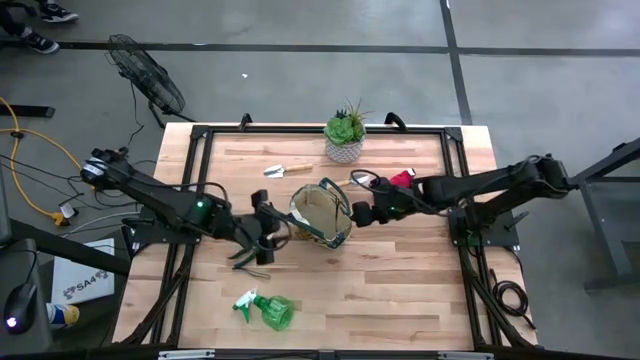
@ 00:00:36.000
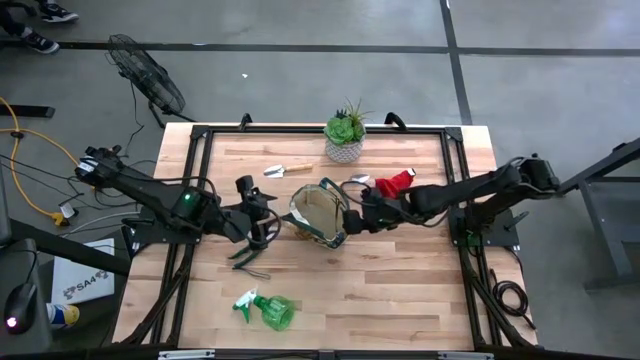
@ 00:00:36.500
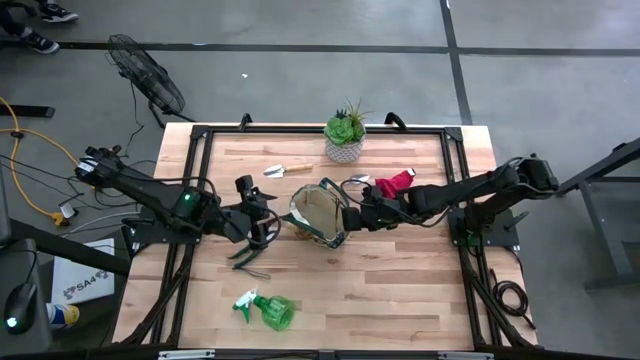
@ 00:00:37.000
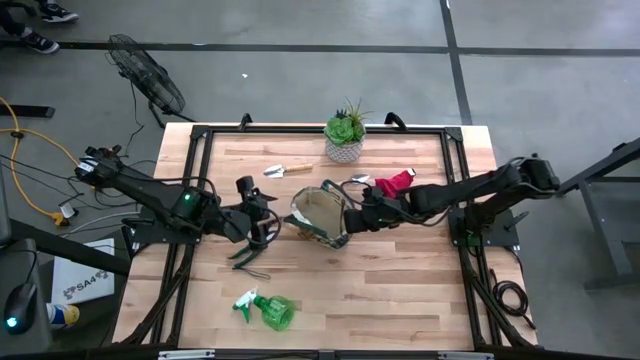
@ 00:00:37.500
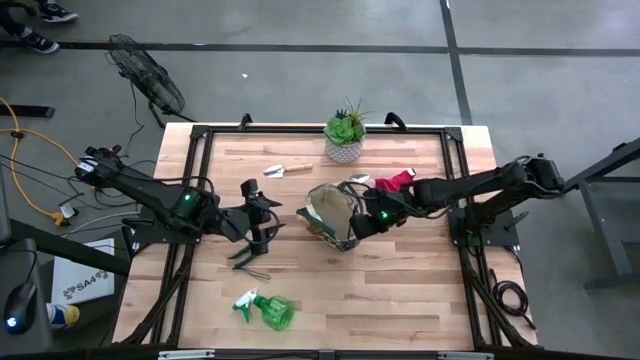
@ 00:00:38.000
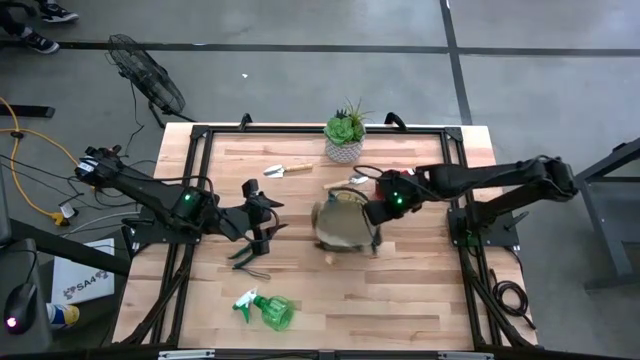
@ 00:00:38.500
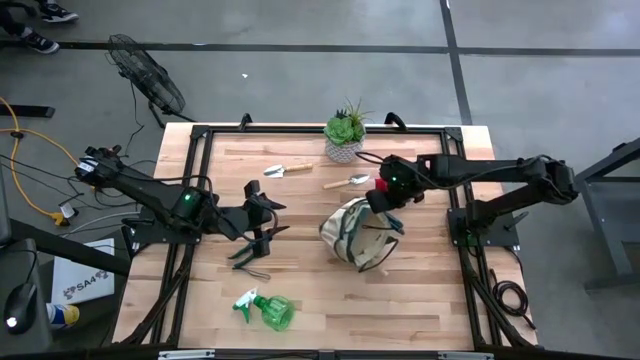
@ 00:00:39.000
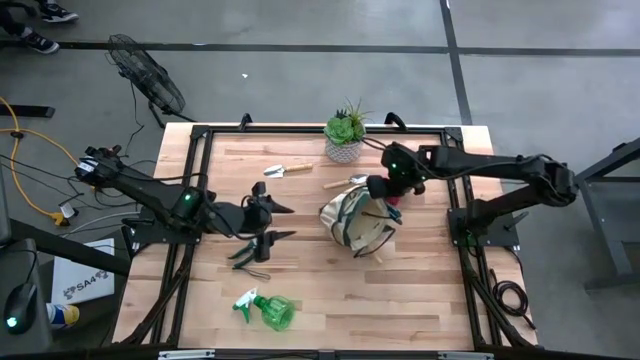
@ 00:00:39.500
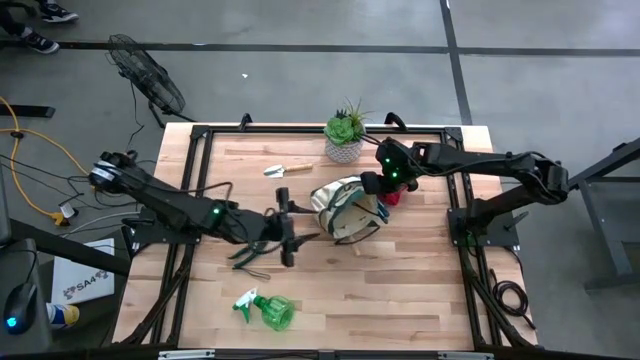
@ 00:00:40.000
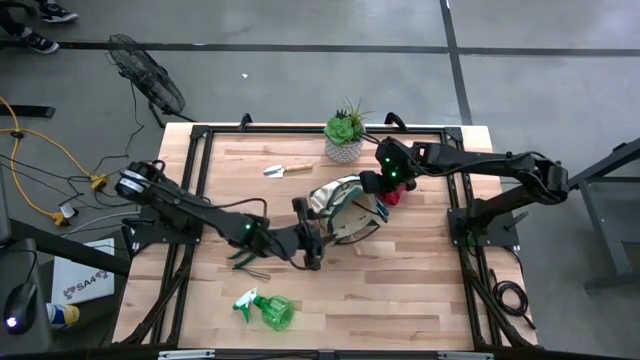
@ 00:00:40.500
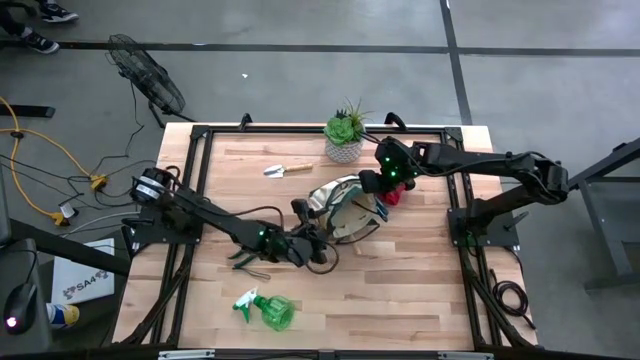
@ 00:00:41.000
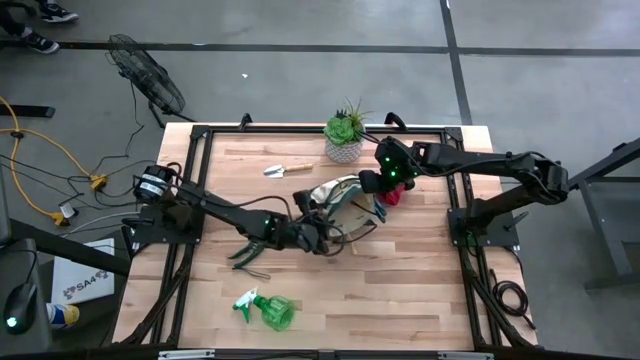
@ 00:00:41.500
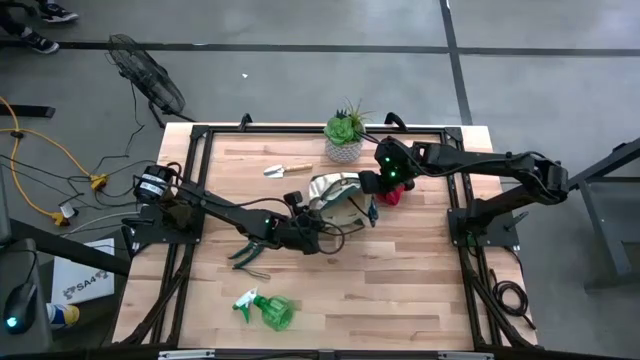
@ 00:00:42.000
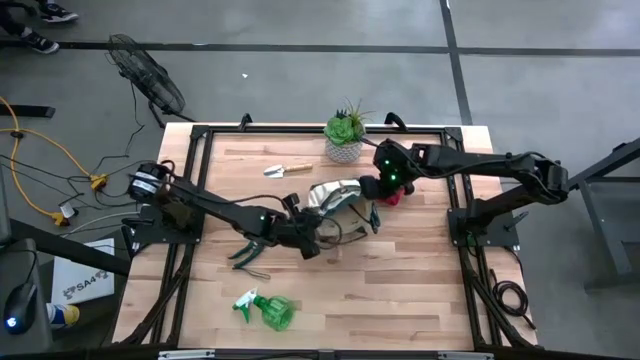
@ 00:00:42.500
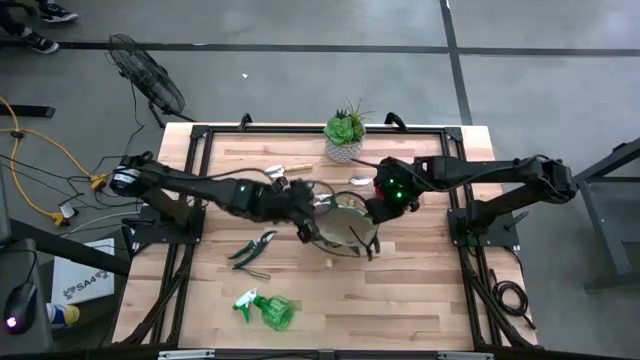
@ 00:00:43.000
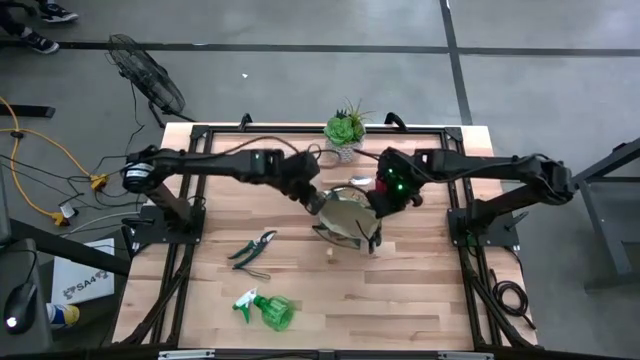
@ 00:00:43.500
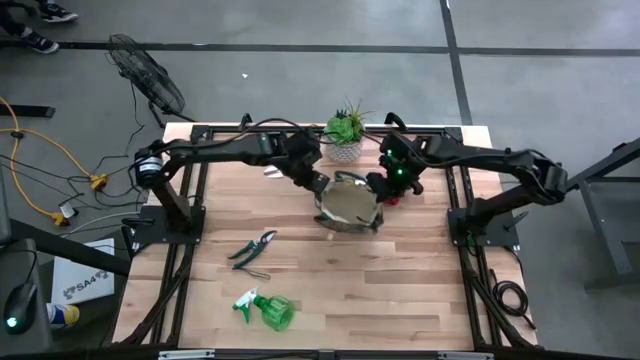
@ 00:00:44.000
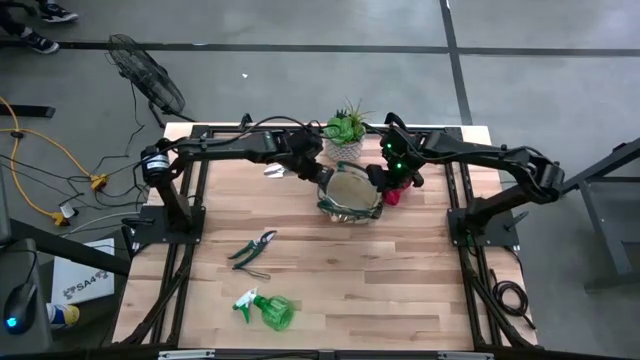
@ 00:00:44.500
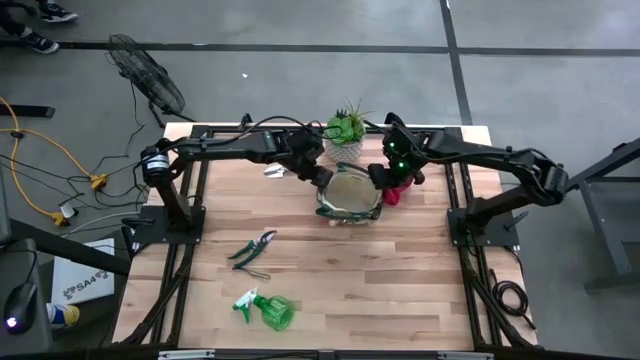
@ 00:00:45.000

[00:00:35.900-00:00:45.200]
Task: Pick & Place Garden tools in Gardening bag
Adjust the brown gardening bag

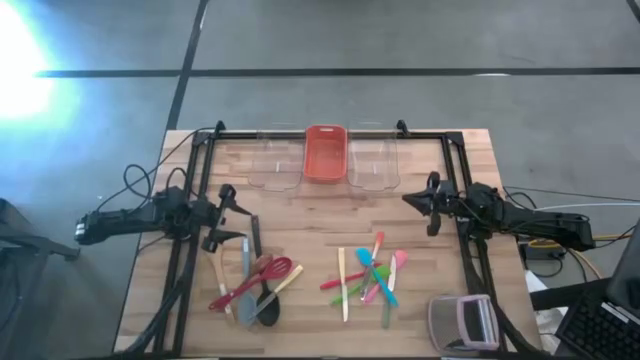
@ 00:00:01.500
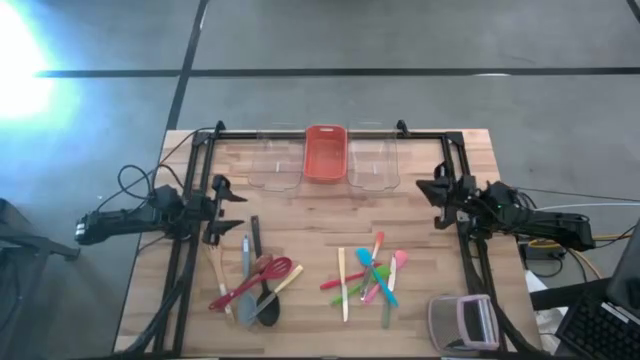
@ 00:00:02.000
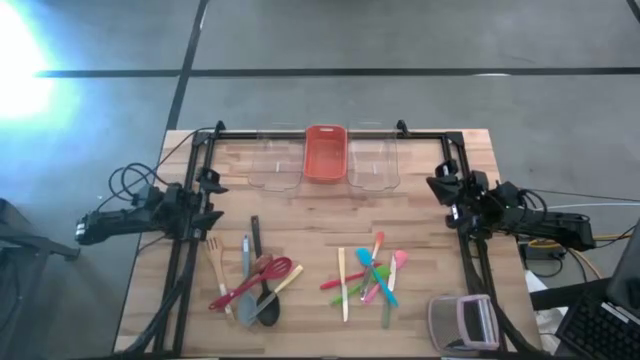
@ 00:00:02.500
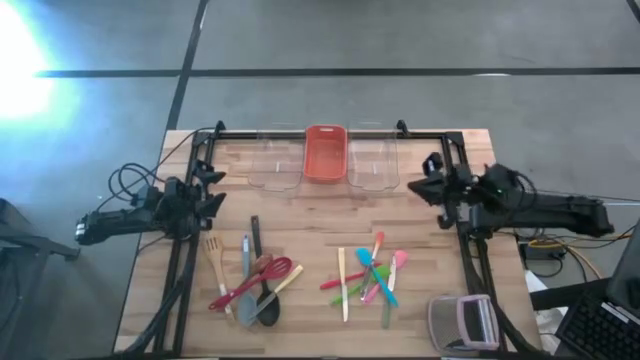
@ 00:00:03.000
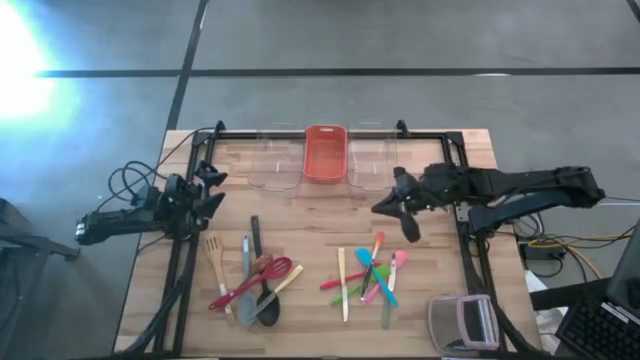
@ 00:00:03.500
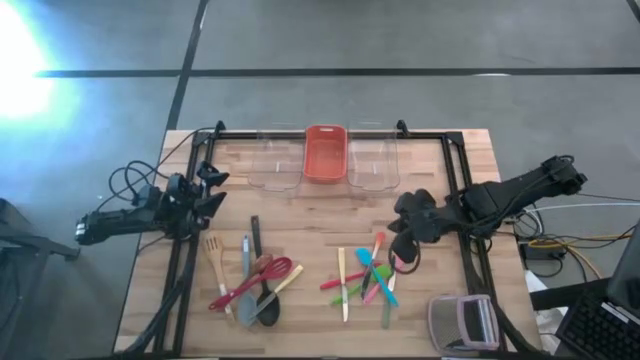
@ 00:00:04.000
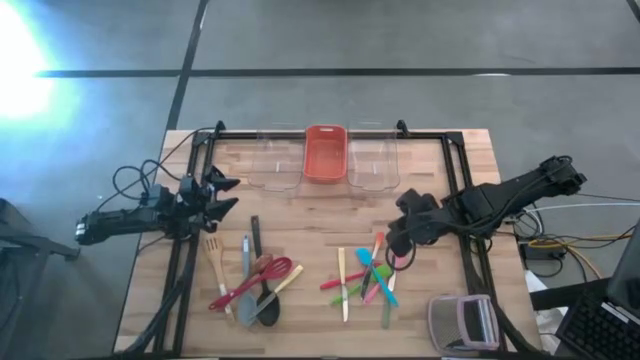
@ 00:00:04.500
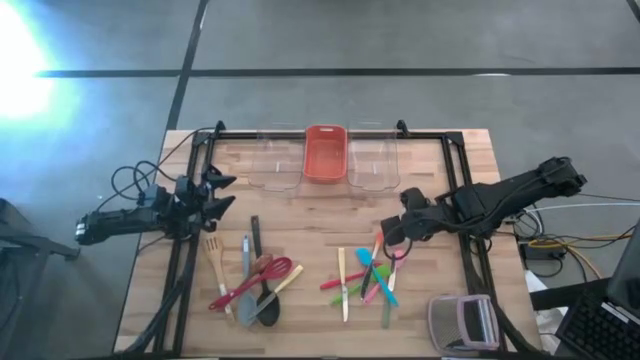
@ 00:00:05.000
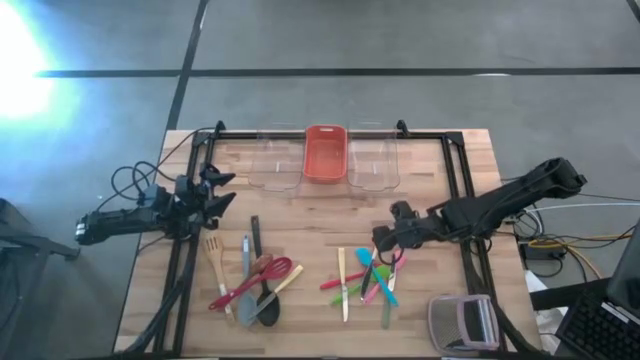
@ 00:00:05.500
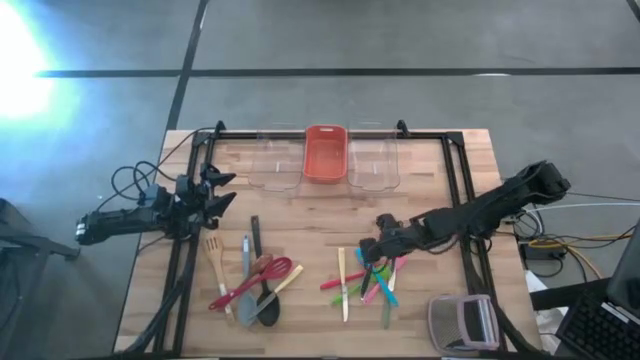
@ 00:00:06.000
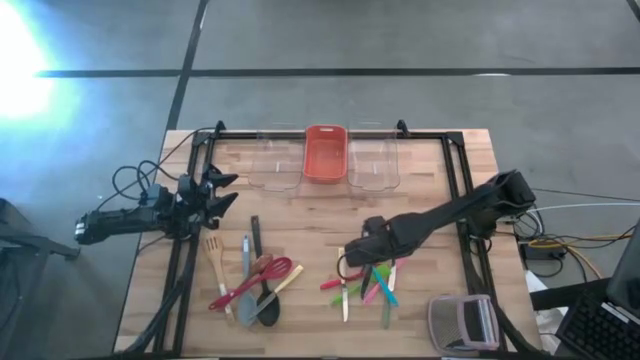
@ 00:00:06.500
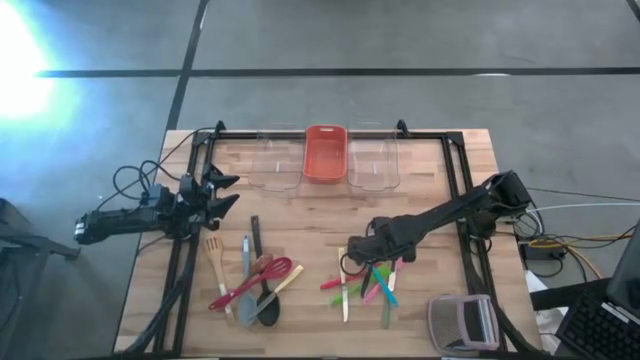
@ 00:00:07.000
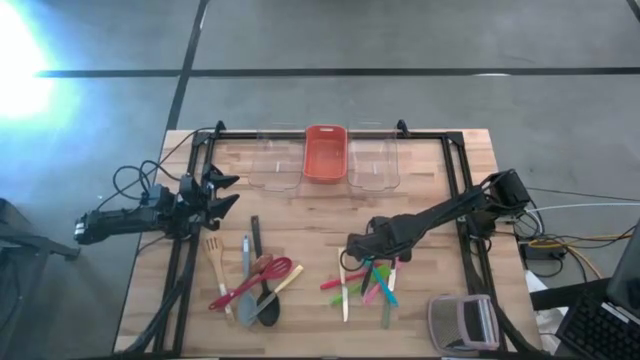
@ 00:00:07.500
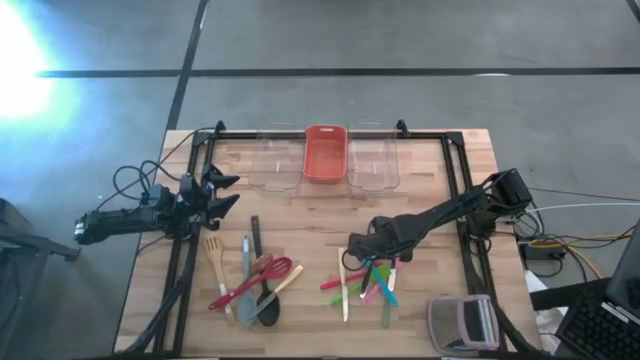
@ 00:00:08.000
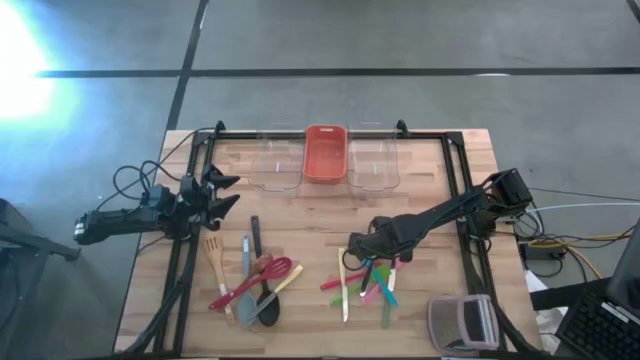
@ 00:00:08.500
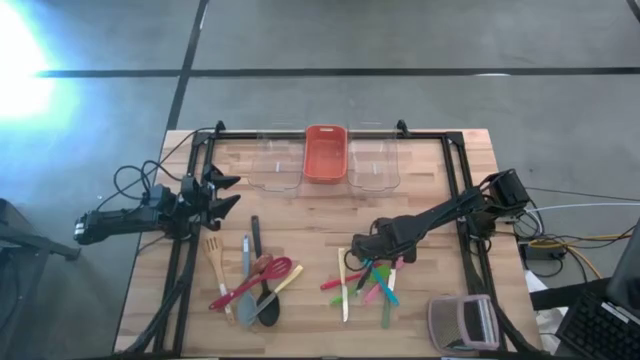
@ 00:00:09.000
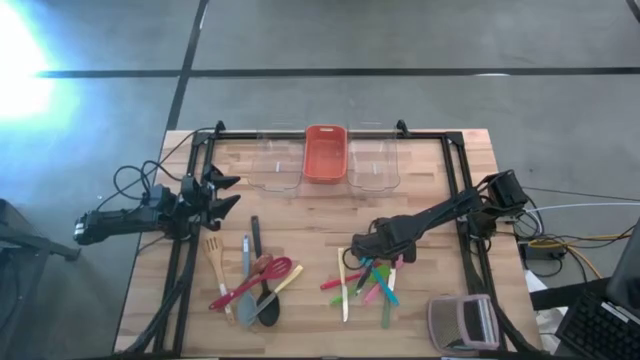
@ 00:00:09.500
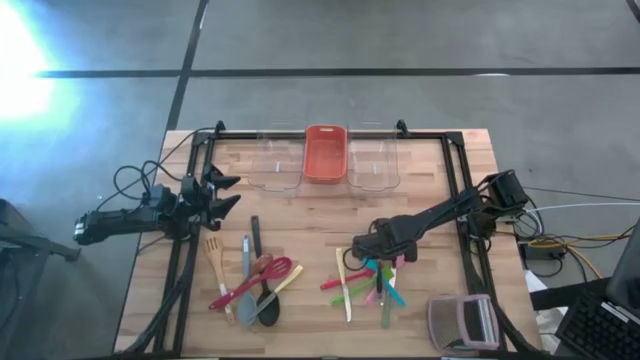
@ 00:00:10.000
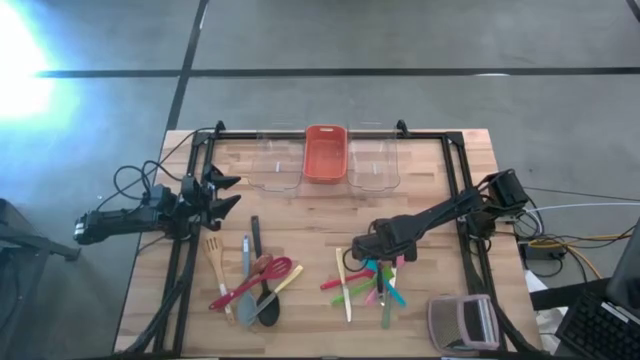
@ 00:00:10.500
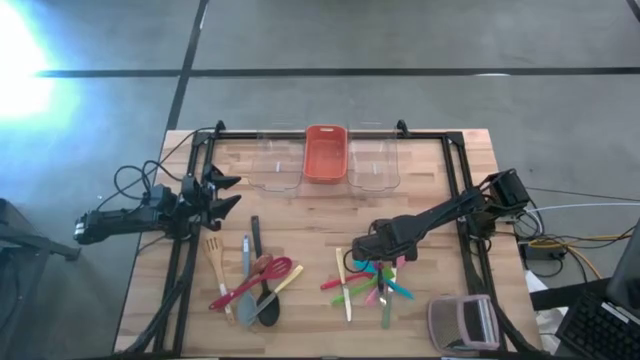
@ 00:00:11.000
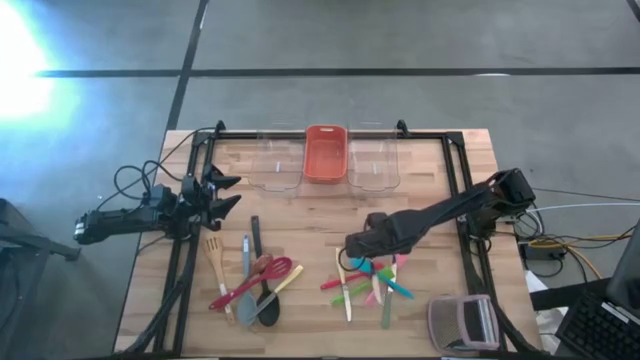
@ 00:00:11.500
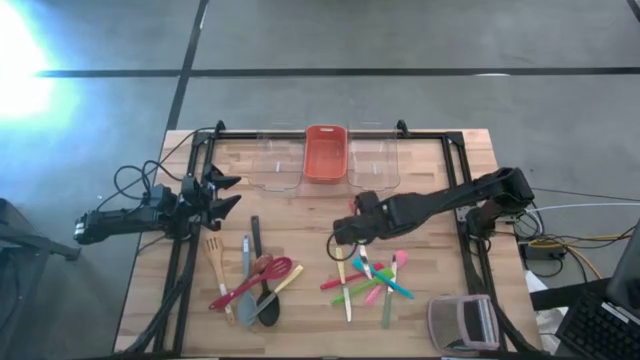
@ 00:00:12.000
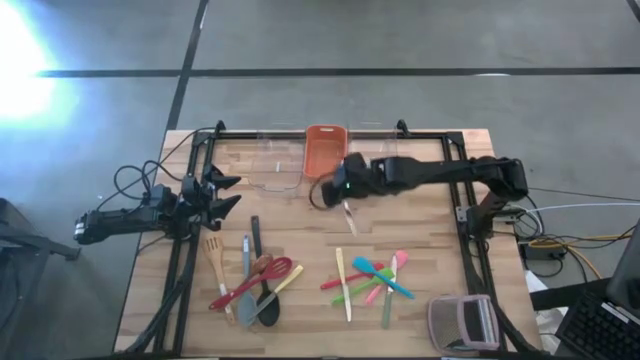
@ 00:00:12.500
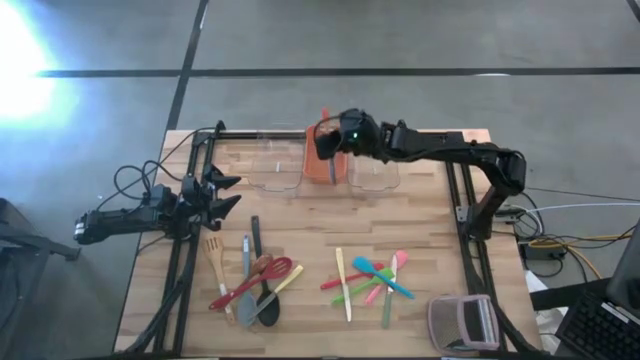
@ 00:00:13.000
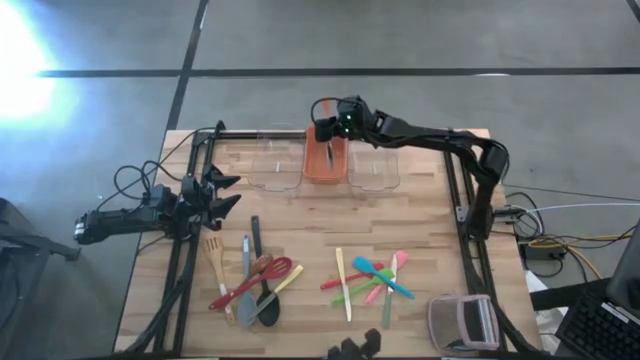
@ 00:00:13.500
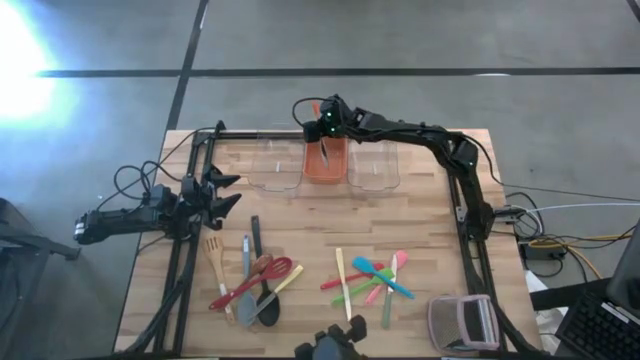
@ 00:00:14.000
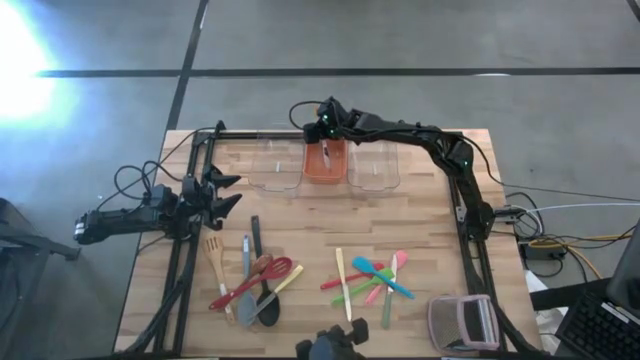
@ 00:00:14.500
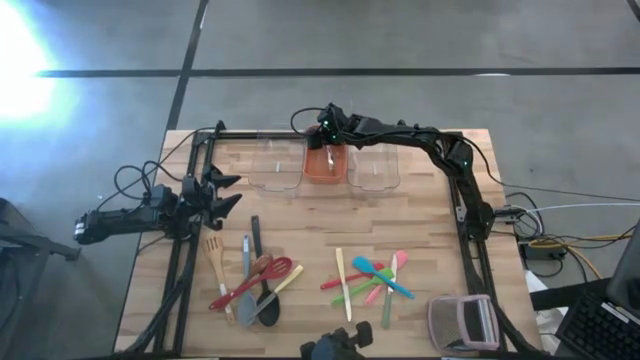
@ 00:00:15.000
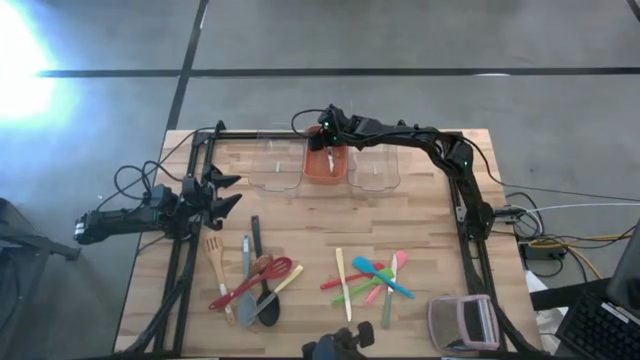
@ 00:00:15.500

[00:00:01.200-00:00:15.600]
Task: Pick & Place Kitchen Items
Put the orange table knife into the orange bin
